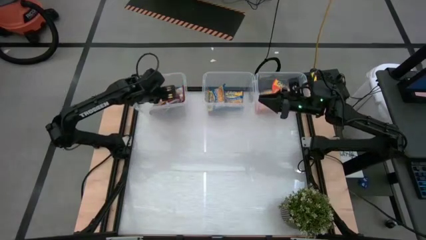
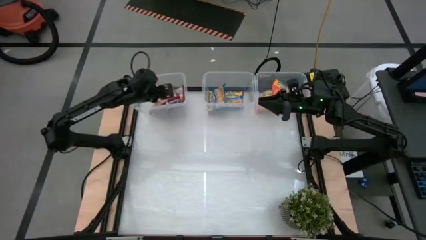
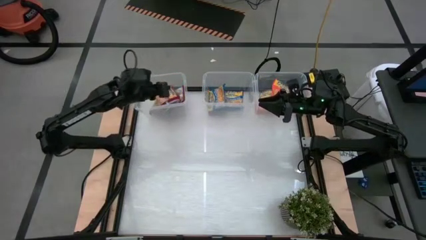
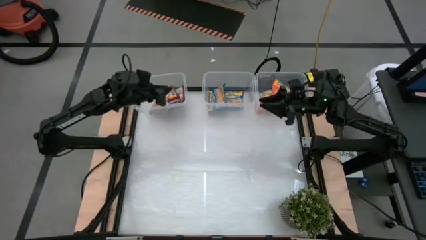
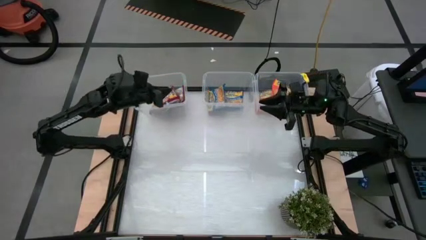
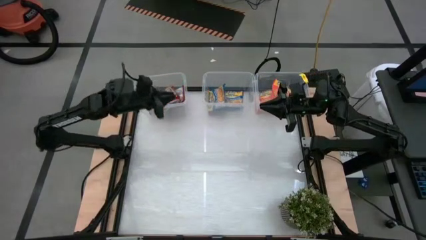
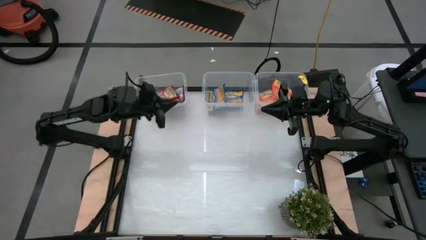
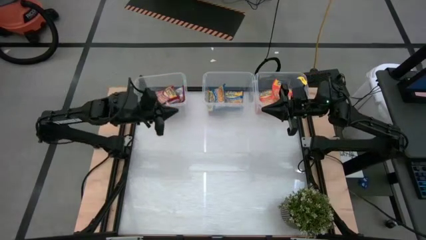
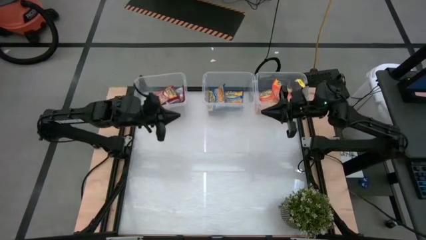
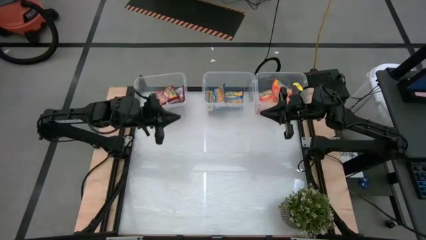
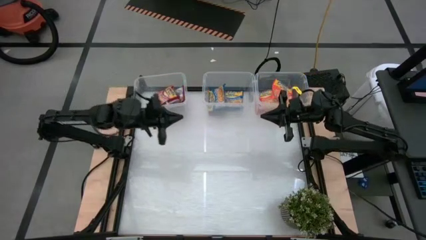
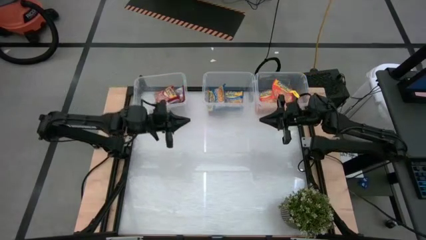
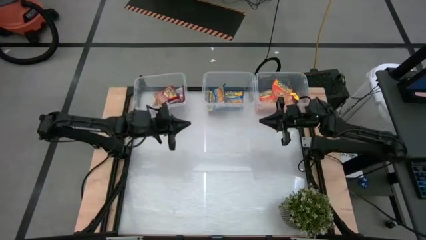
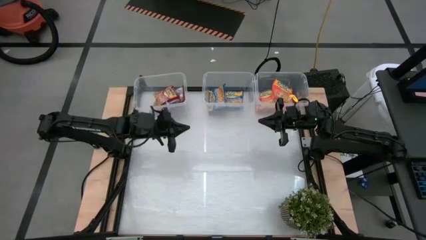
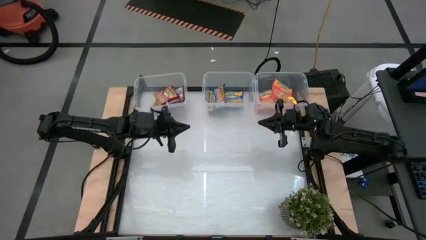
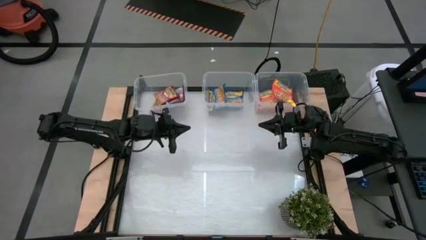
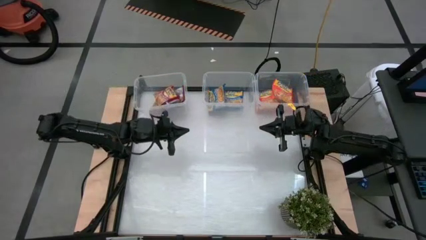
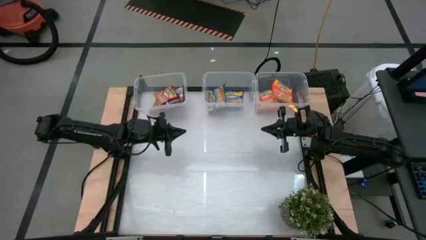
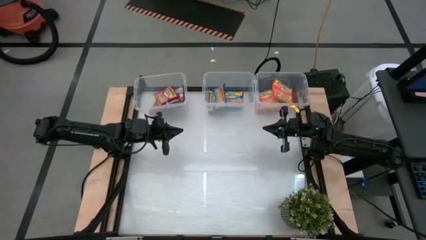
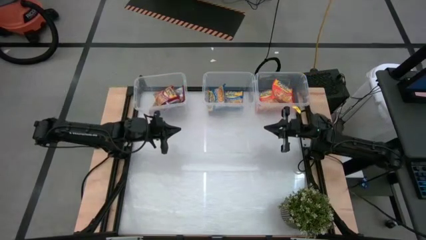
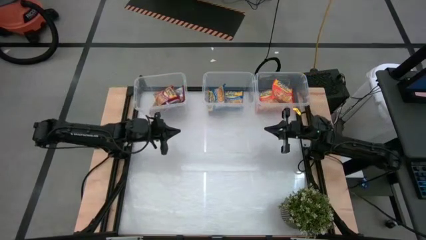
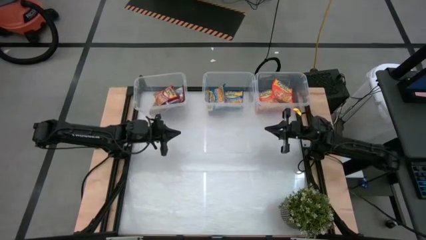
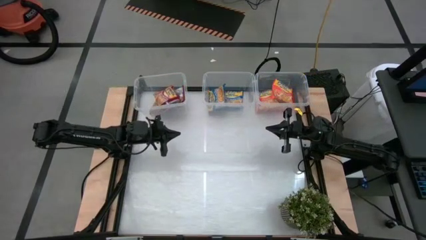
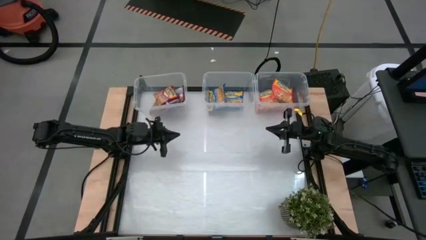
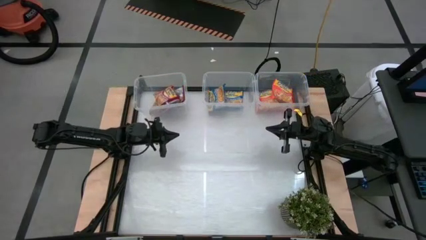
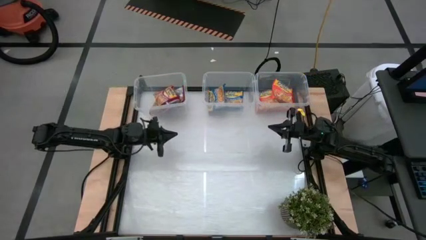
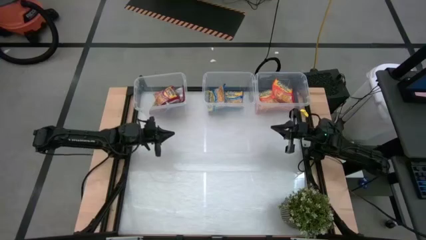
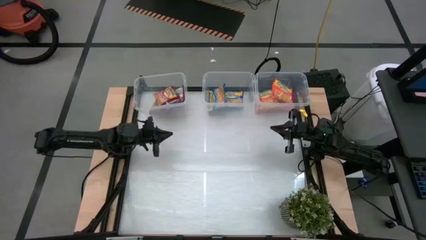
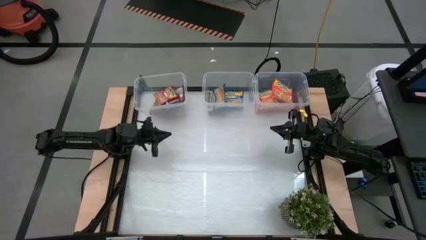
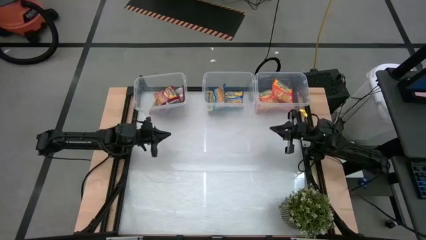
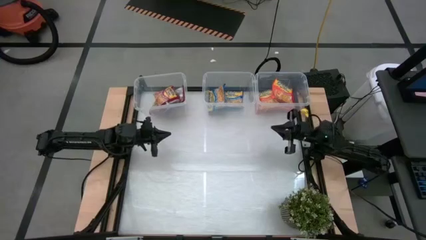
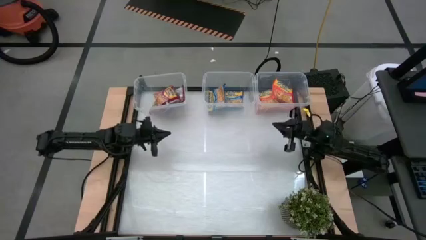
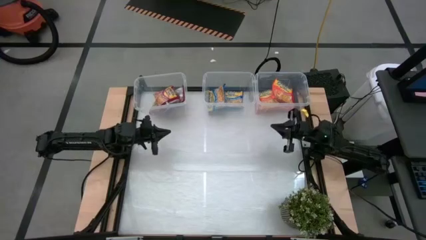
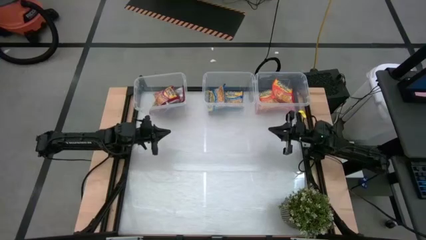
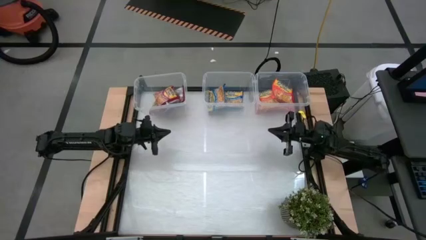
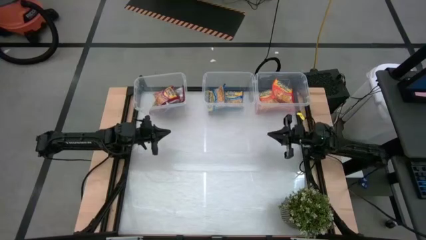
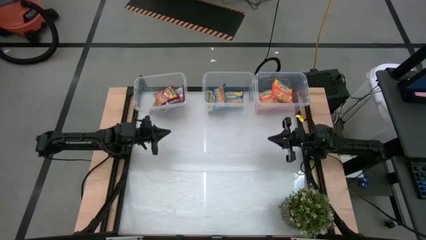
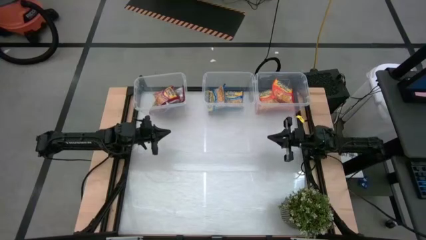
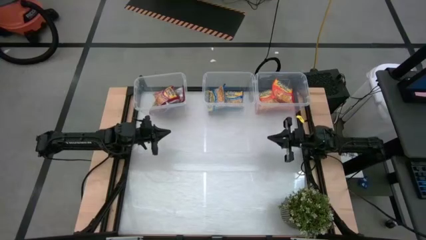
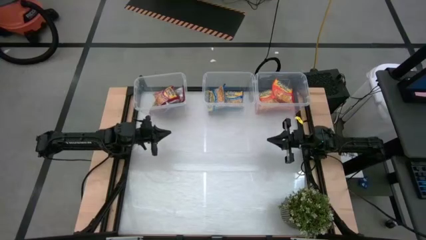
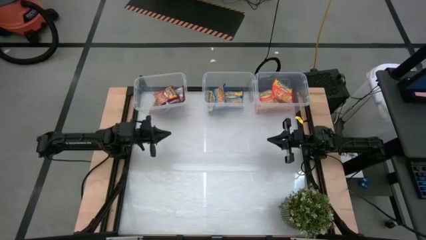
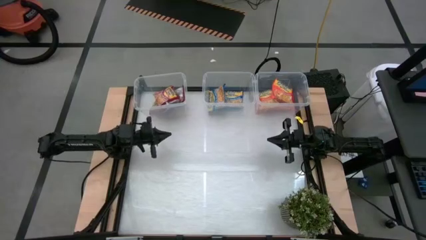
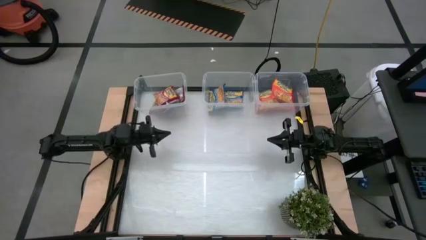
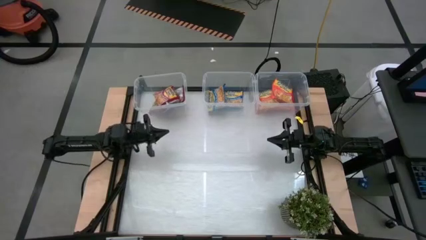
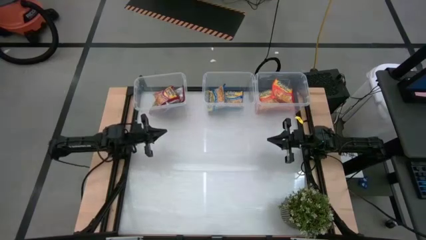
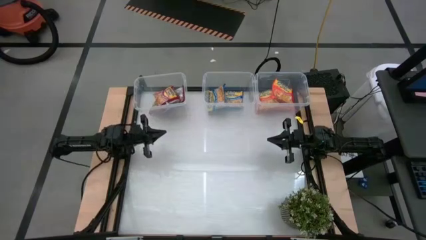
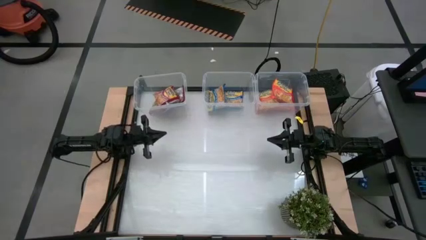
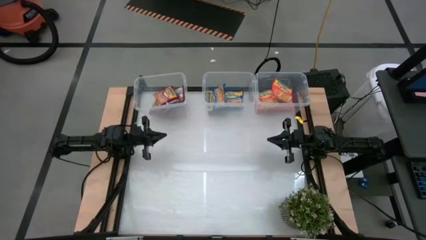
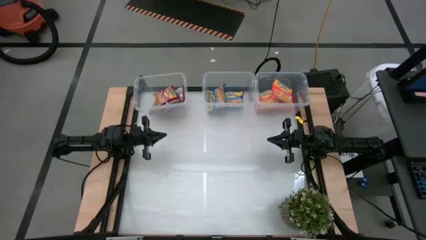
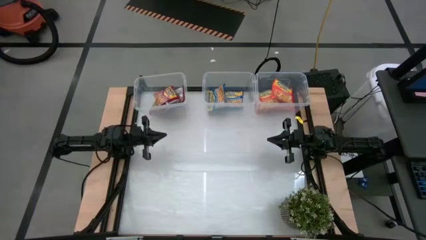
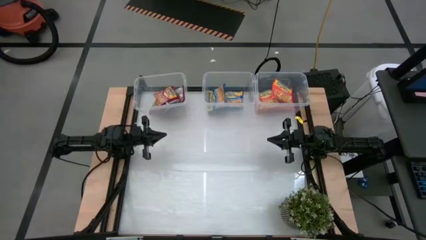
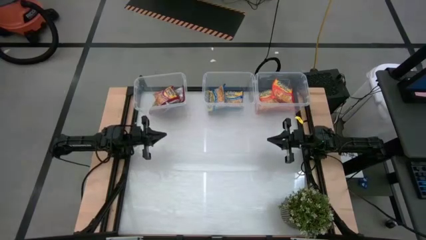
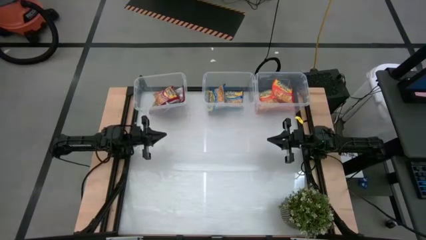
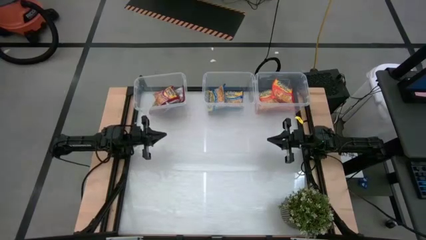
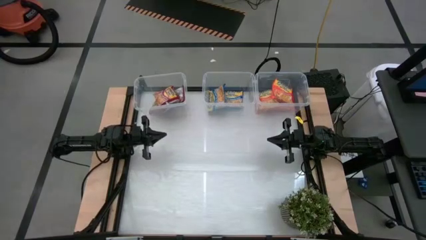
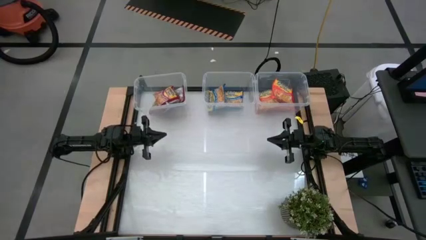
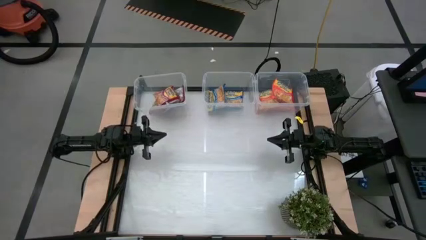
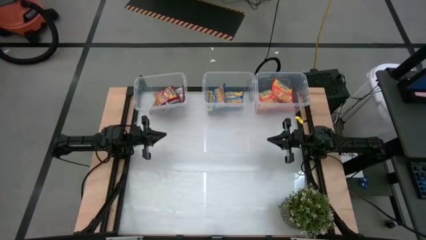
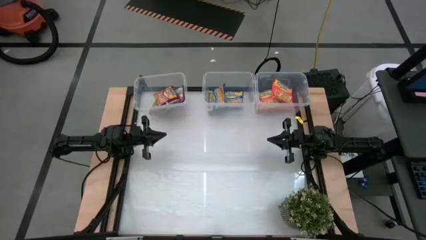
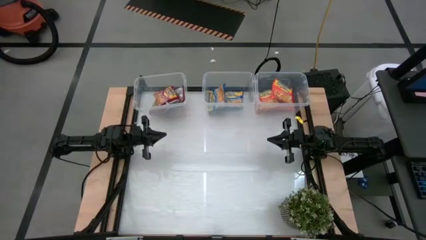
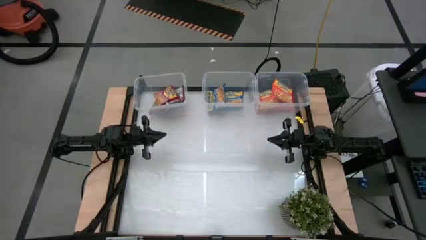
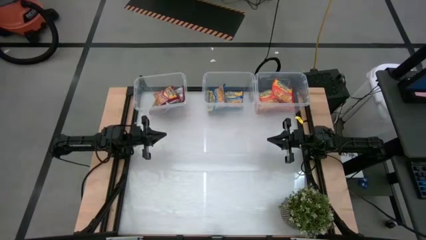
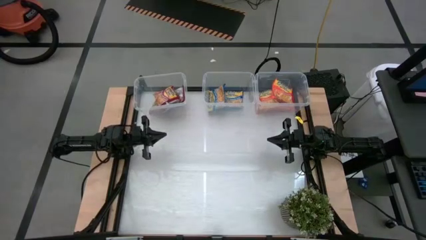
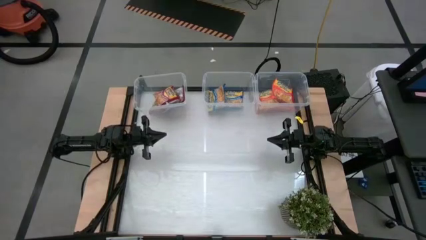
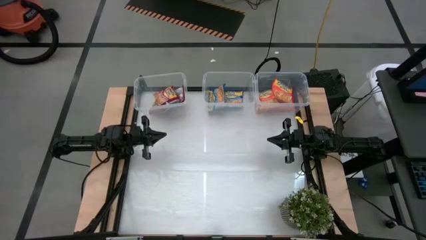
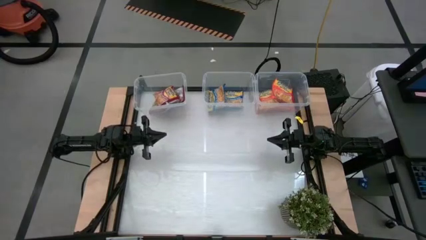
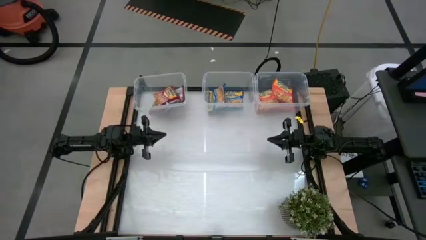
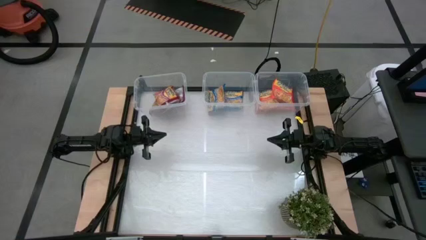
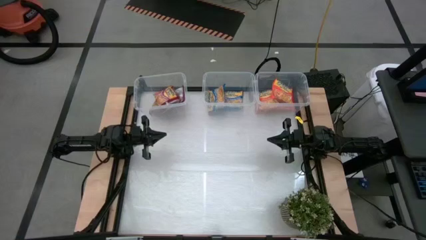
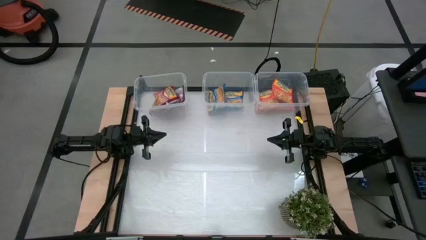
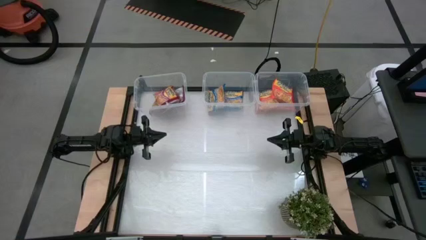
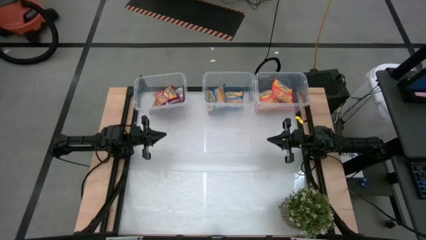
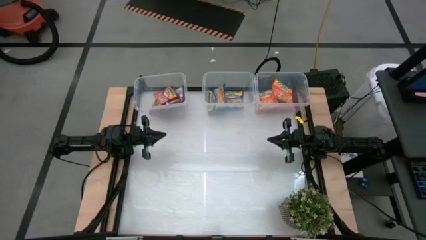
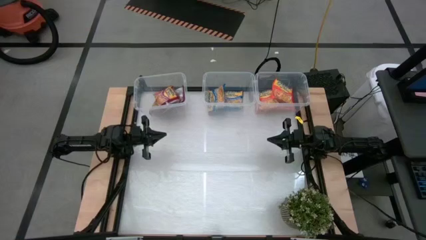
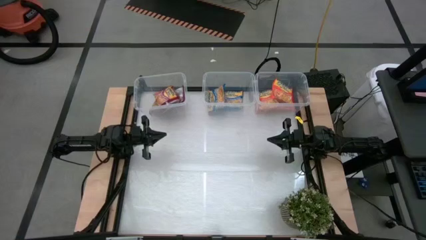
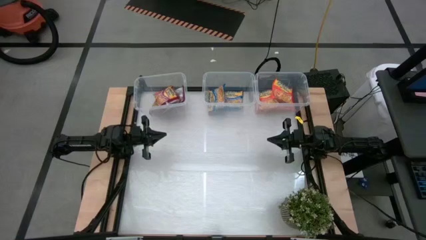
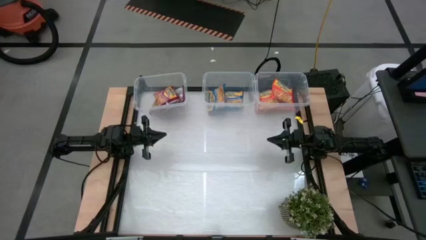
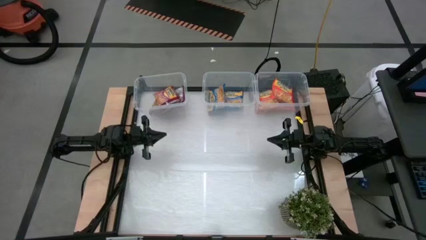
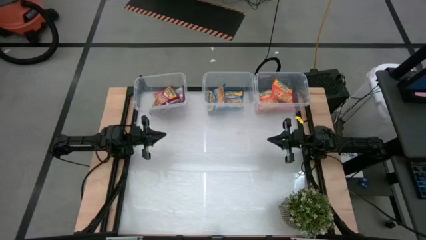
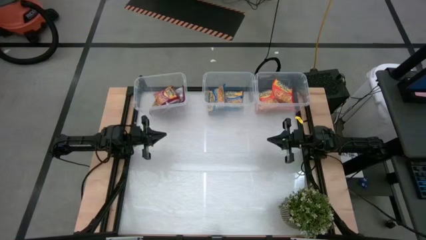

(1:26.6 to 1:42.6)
Task: Sort Maruchan noodles
Return to Home Position

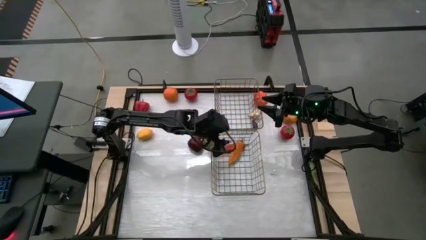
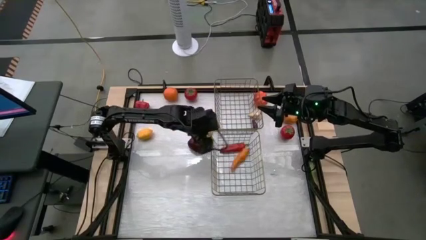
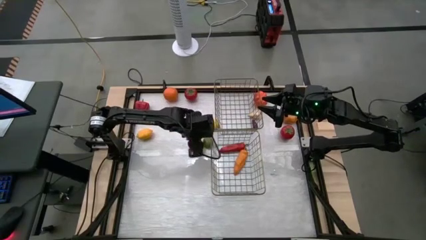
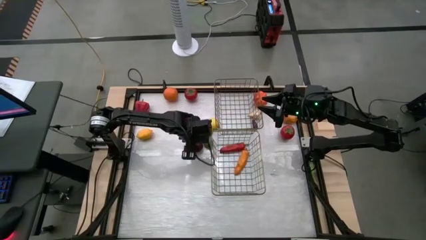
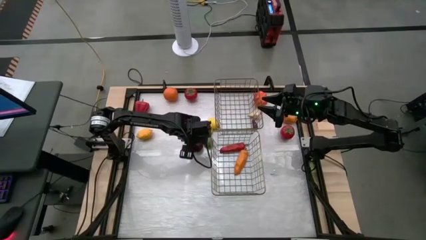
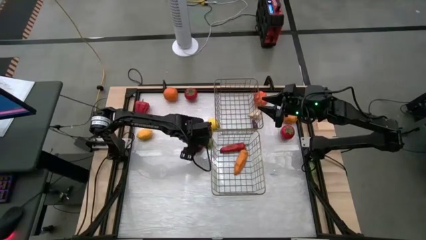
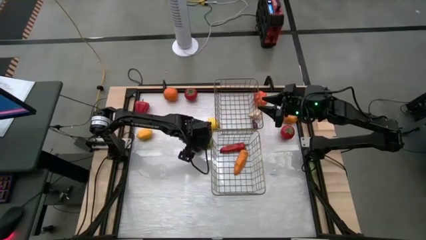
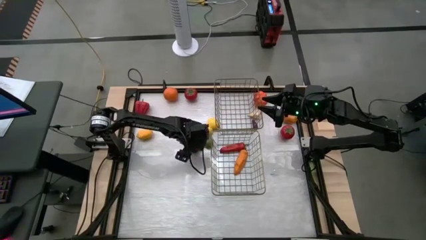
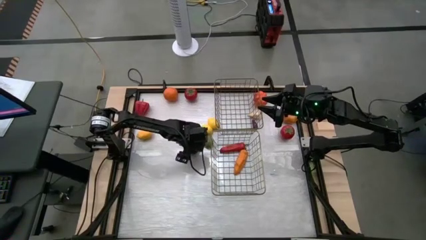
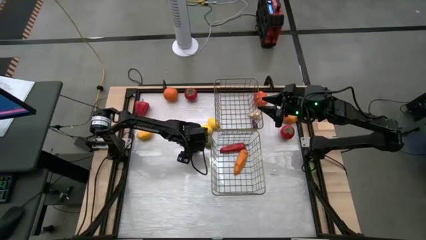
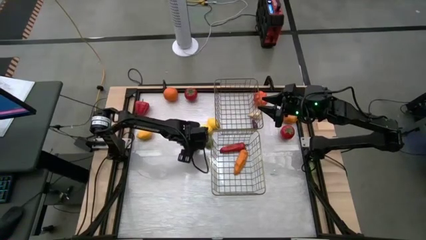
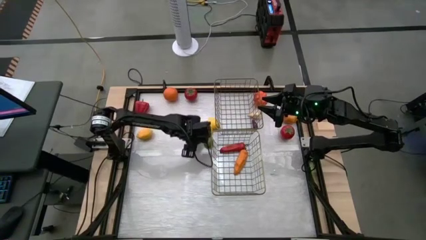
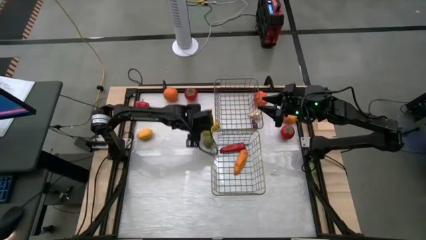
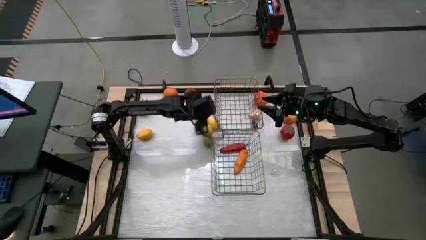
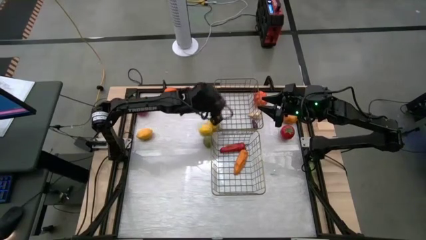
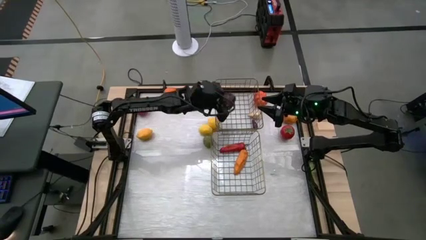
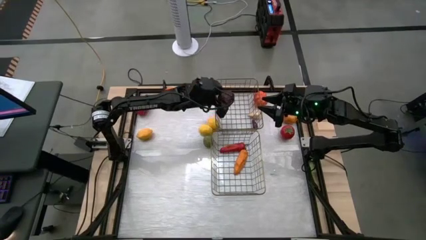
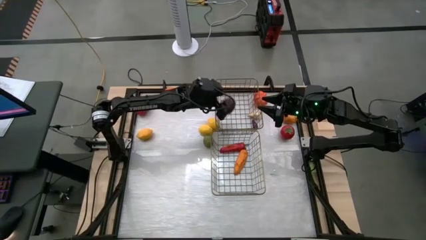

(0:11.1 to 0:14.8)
Task: Sort produce into baskets
Put the red apple into the top wire basket
